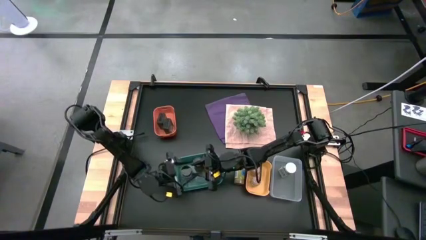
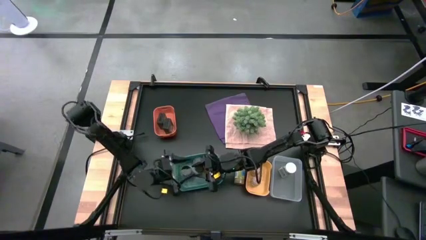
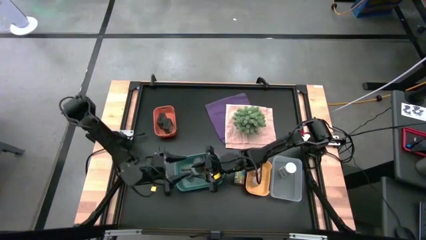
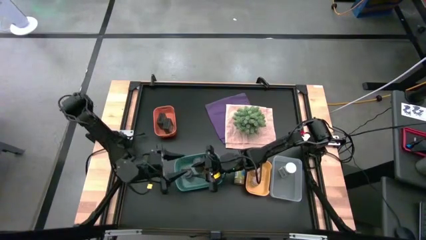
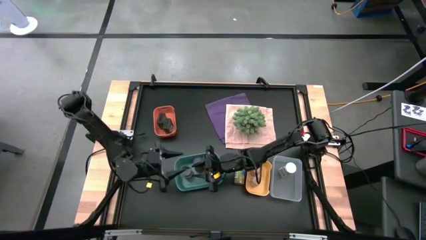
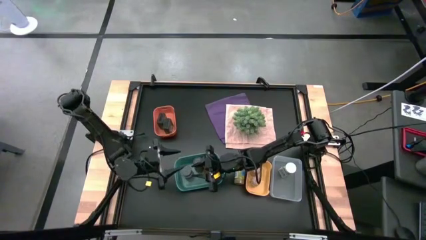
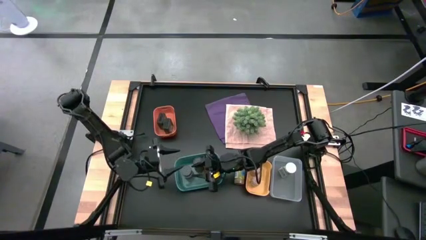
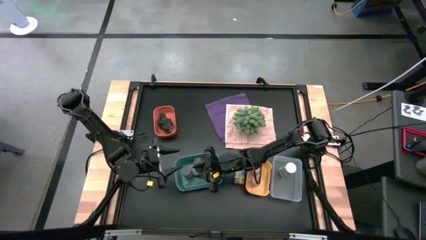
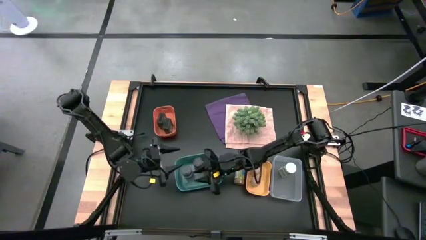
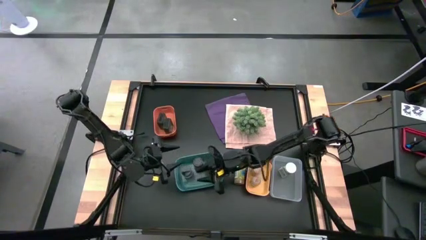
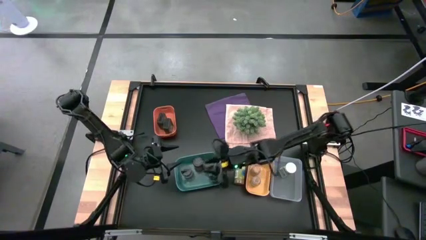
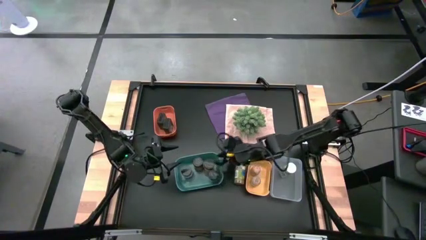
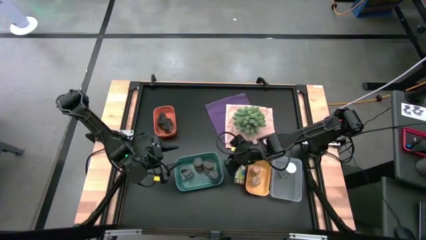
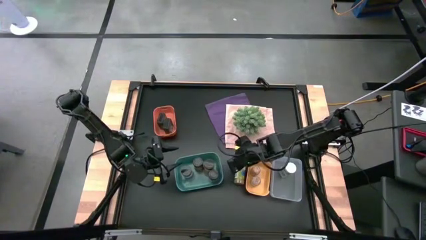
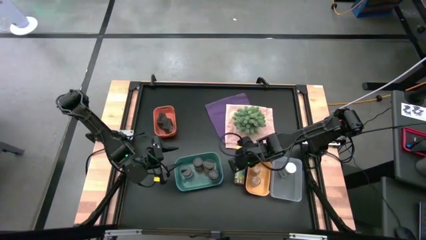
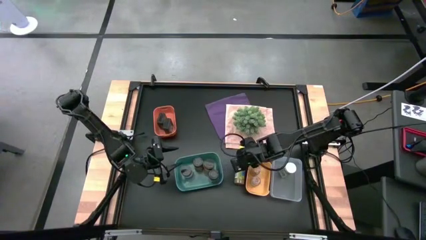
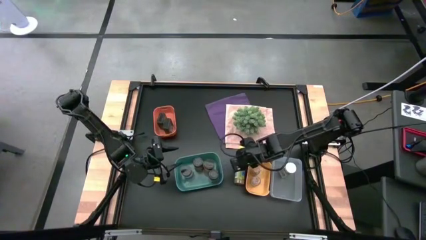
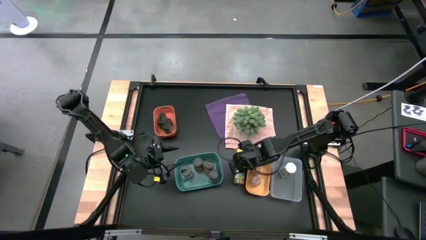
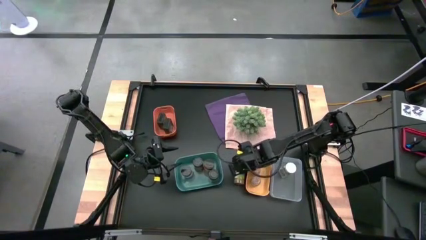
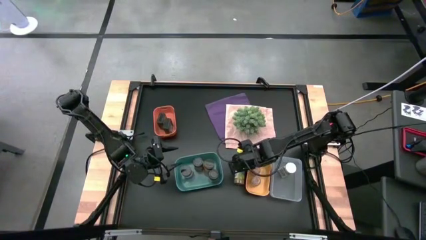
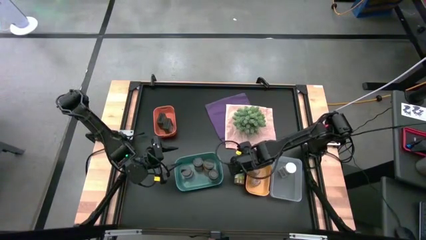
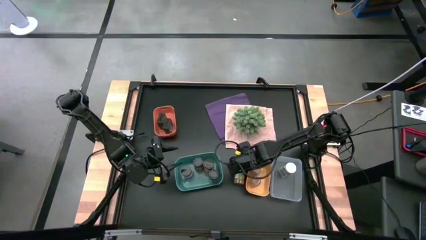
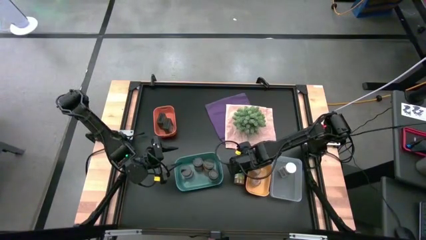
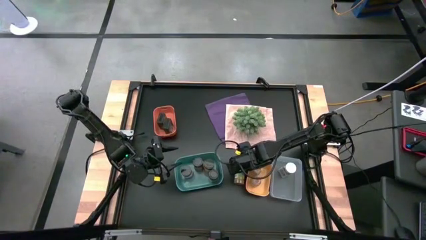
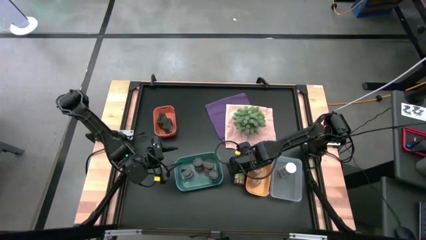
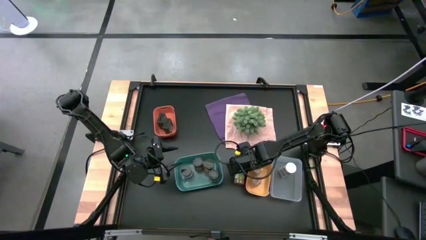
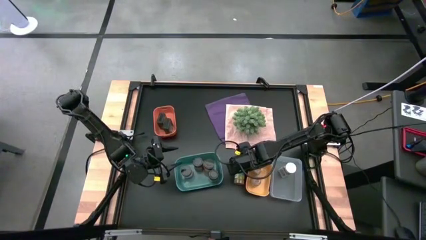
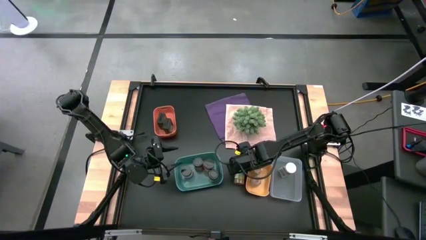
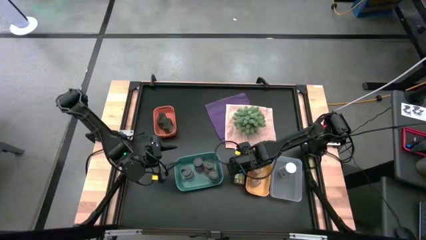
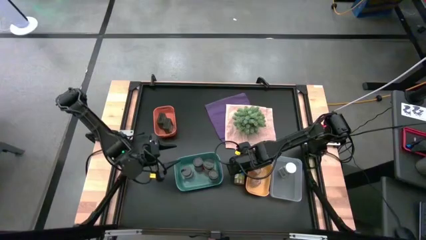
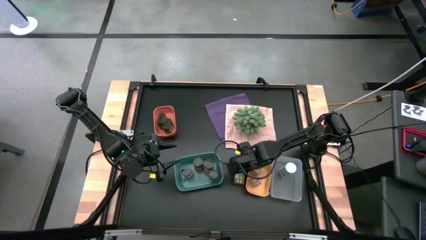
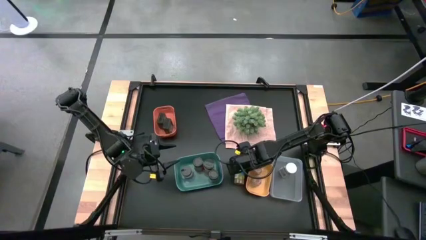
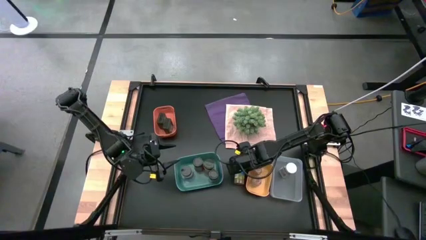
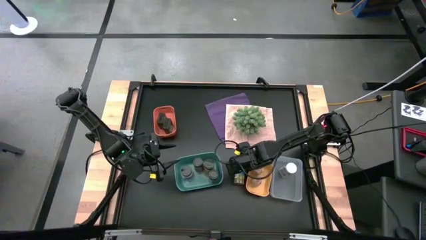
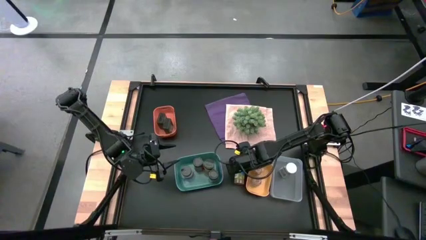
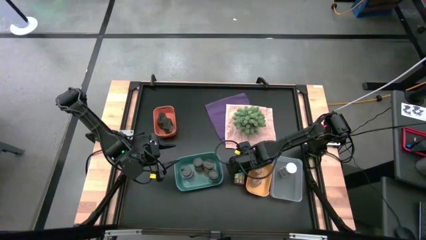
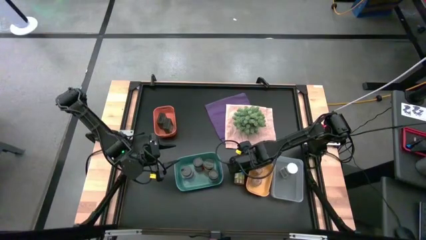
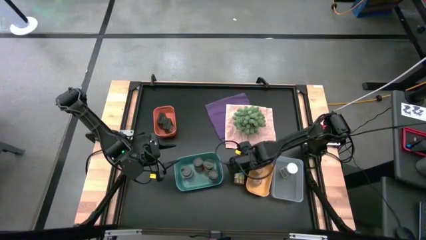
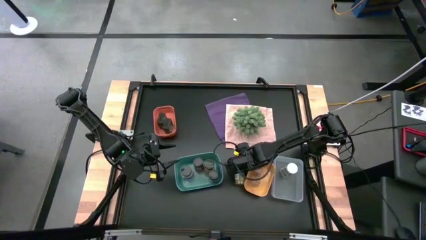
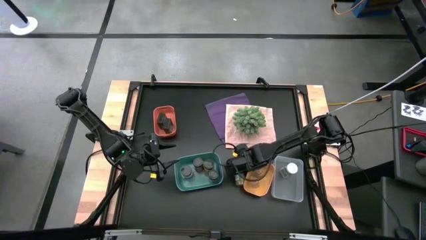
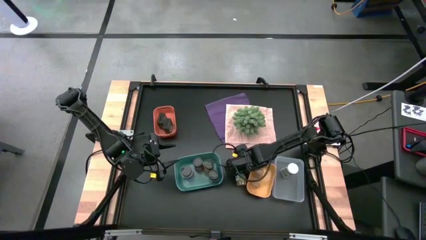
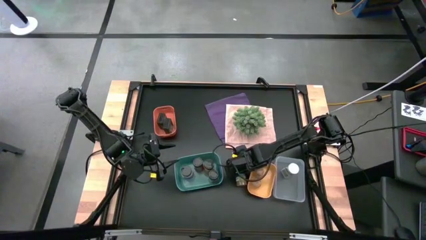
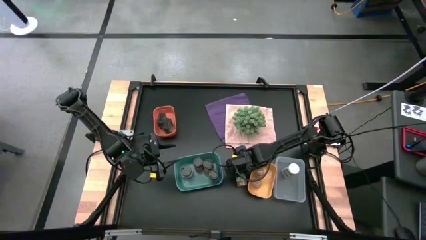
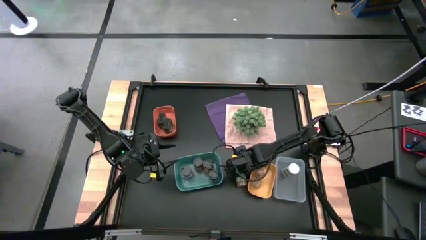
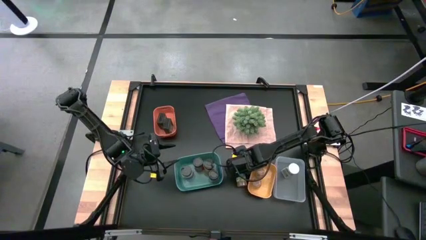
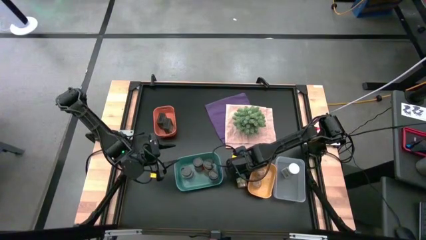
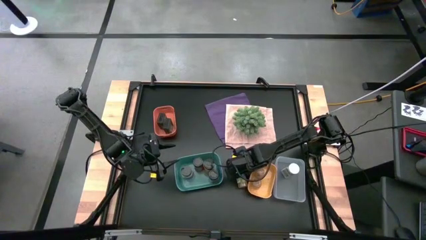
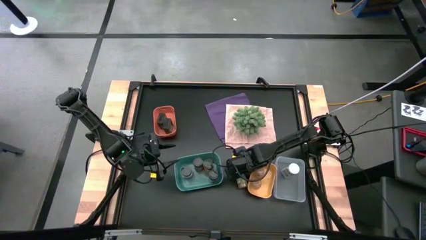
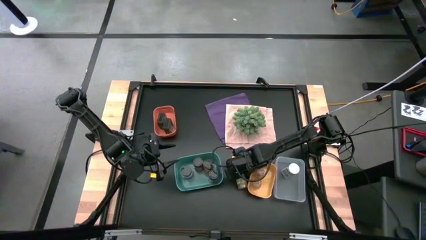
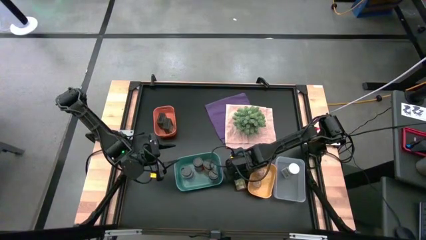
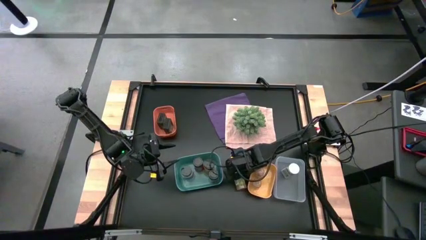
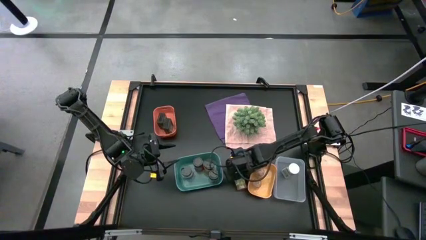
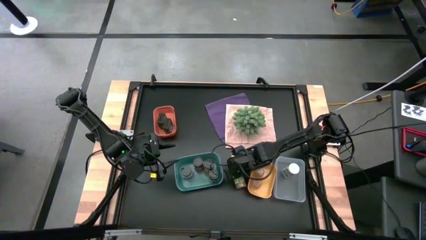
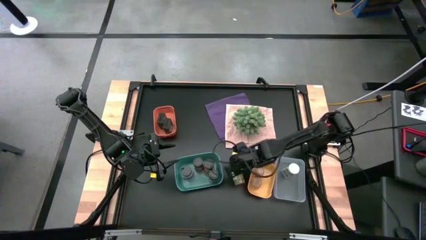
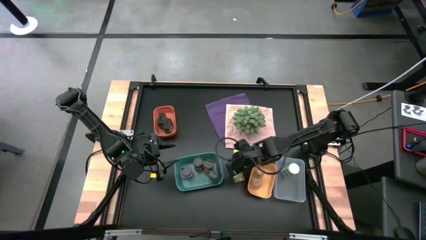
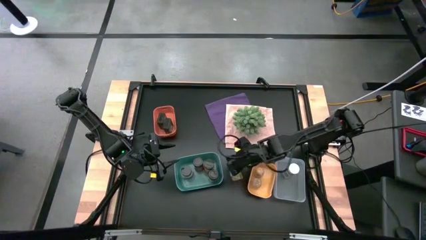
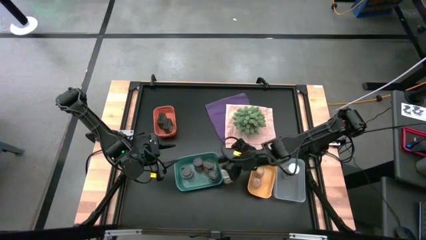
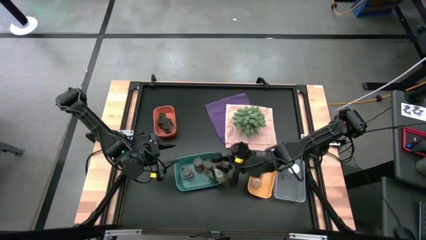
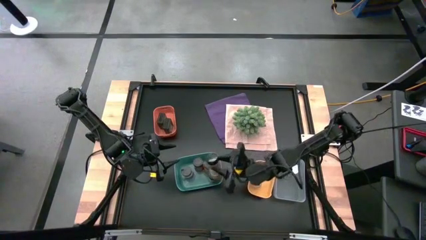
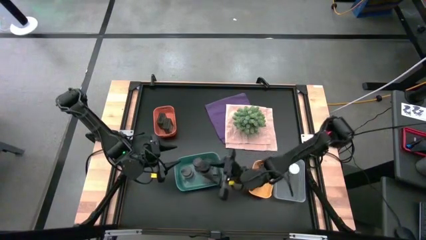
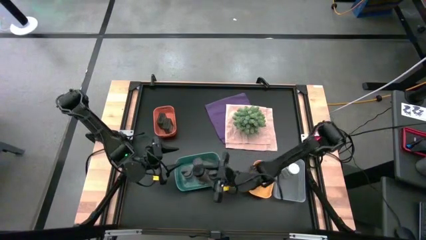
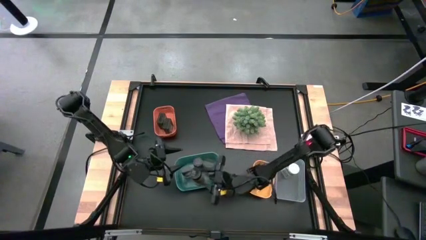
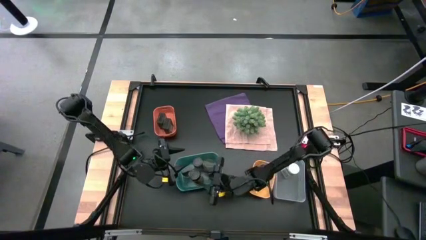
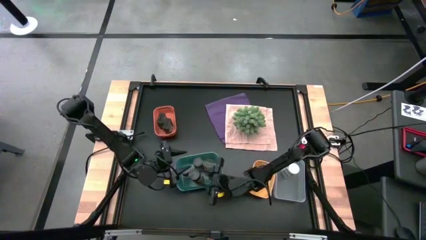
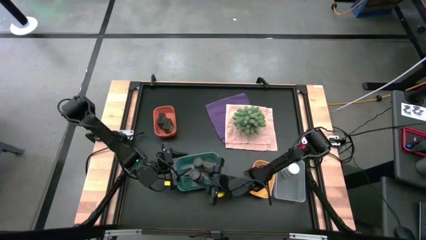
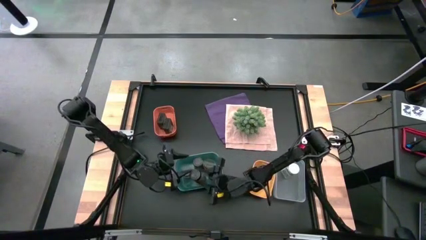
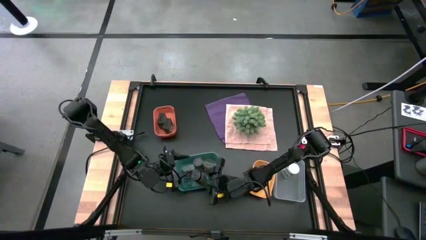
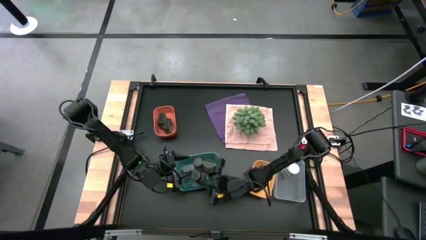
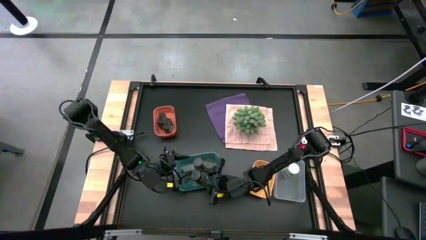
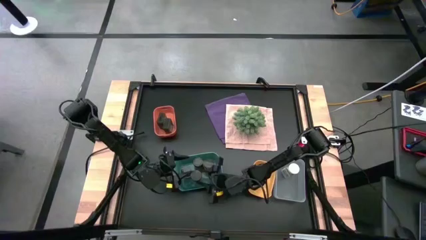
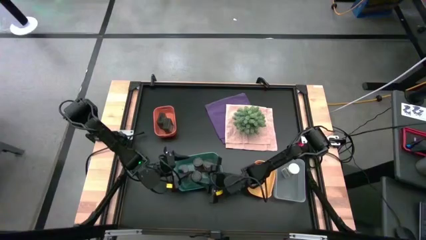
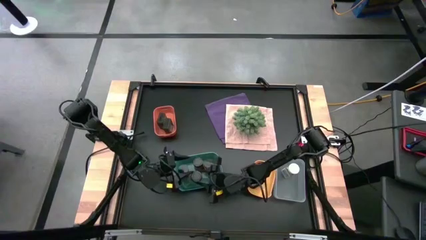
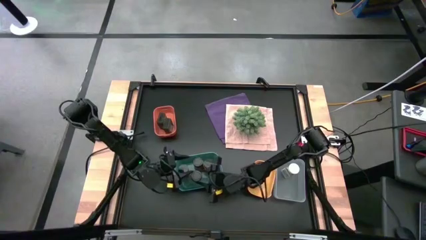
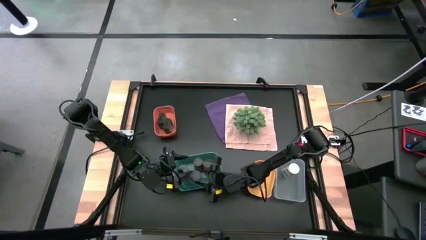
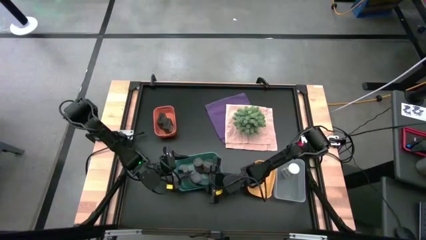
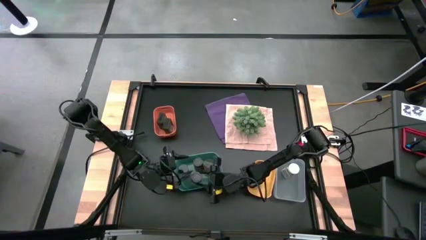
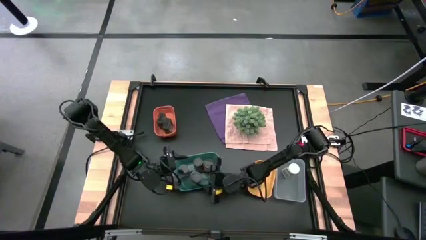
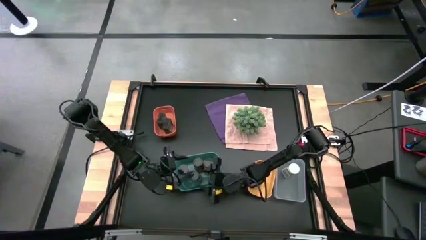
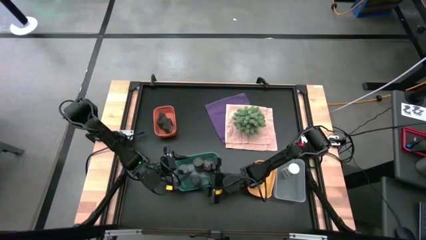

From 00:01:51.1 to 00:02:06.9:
Task: Sort spices by type
Put the green seasoning bottle into the blue bin
